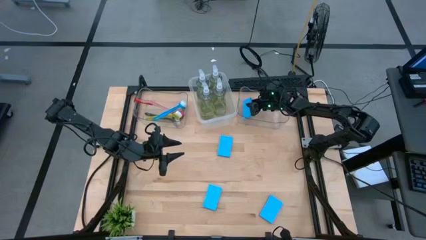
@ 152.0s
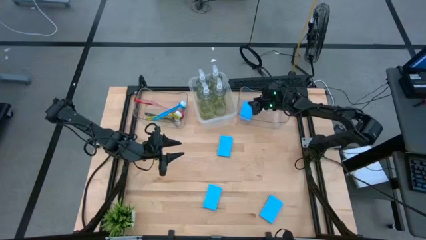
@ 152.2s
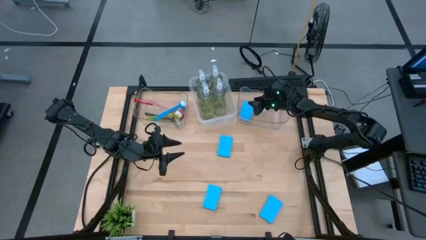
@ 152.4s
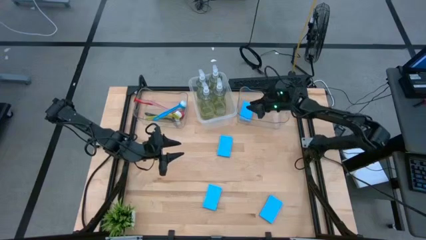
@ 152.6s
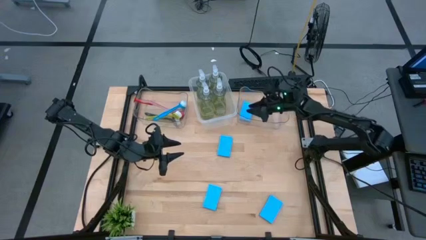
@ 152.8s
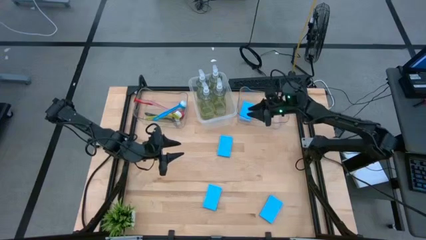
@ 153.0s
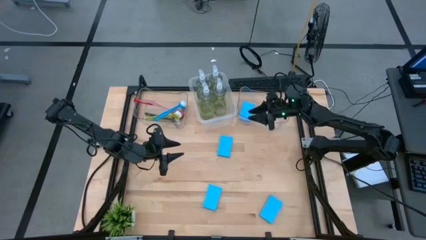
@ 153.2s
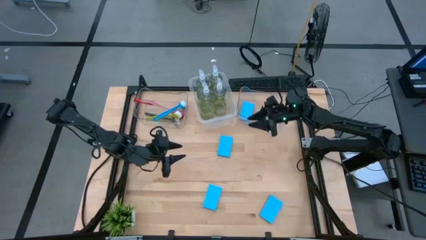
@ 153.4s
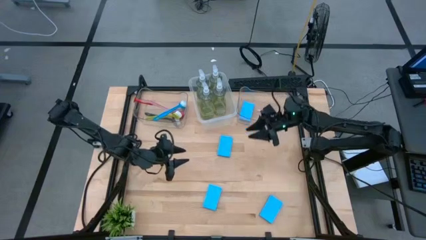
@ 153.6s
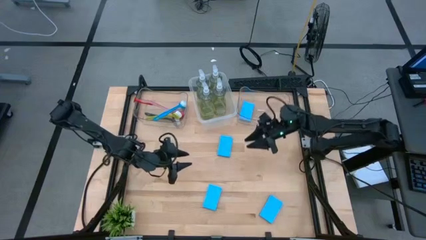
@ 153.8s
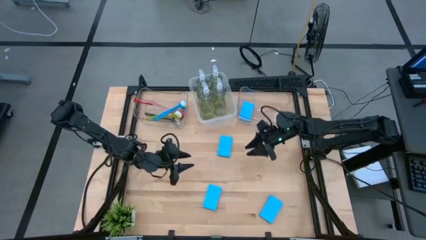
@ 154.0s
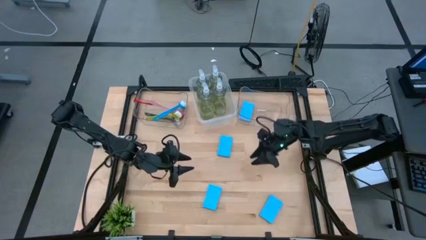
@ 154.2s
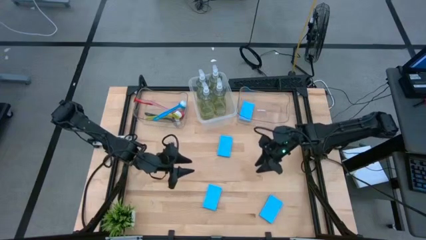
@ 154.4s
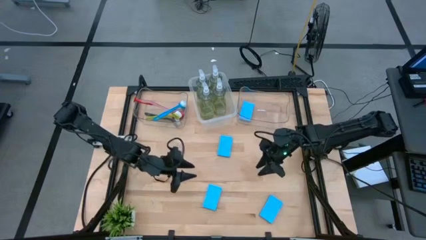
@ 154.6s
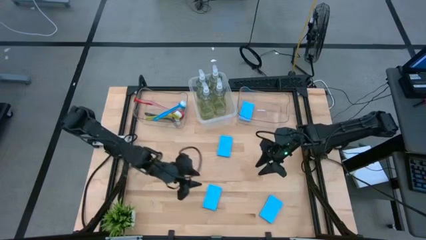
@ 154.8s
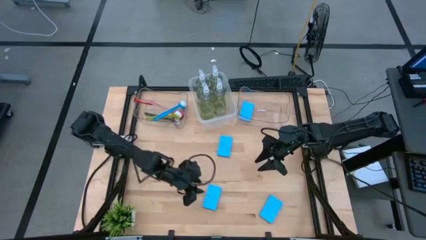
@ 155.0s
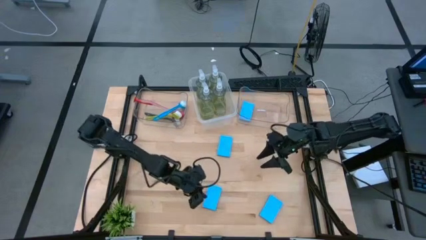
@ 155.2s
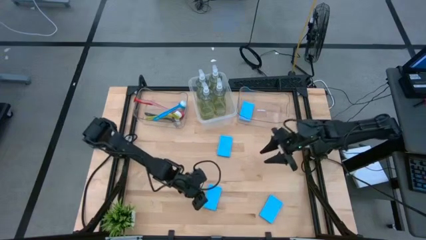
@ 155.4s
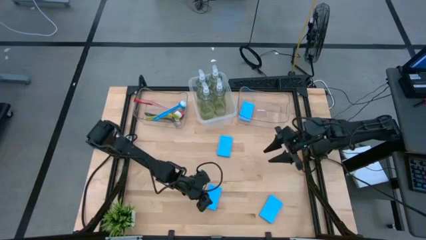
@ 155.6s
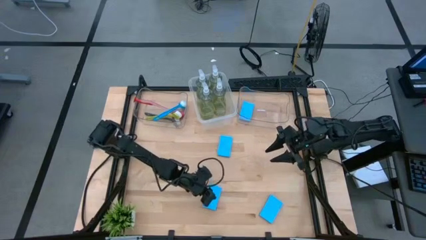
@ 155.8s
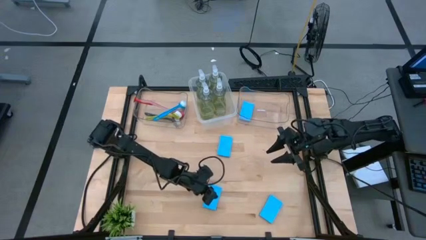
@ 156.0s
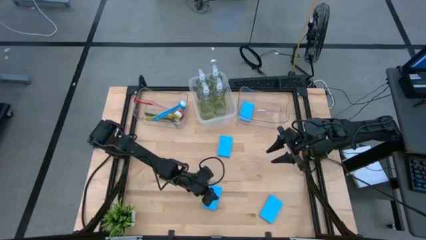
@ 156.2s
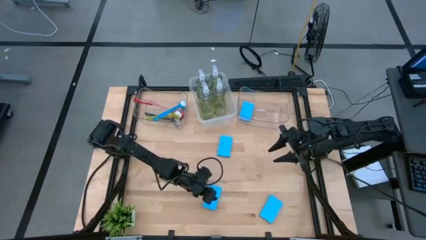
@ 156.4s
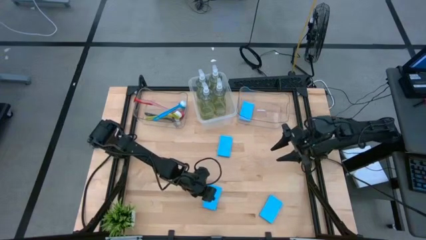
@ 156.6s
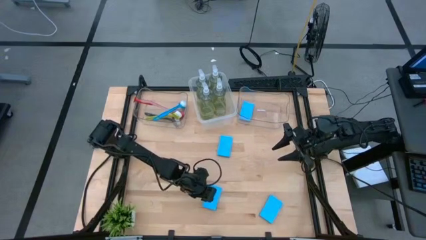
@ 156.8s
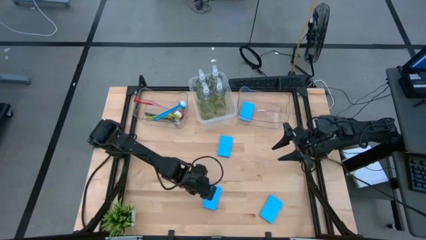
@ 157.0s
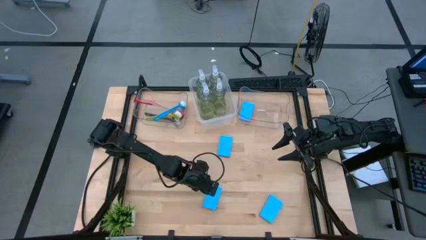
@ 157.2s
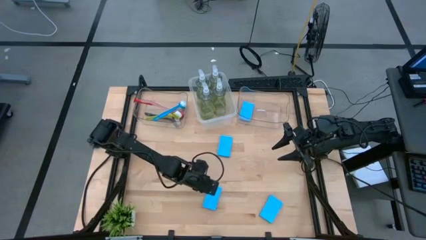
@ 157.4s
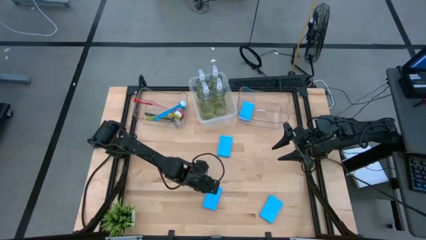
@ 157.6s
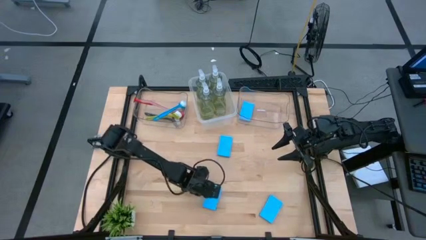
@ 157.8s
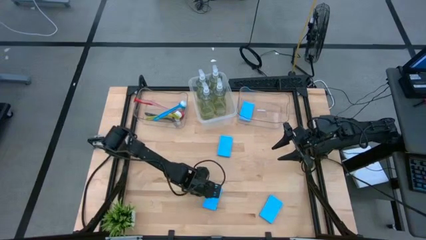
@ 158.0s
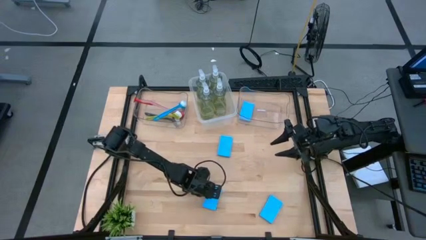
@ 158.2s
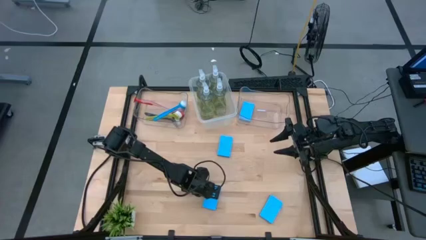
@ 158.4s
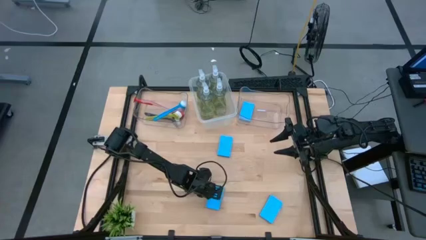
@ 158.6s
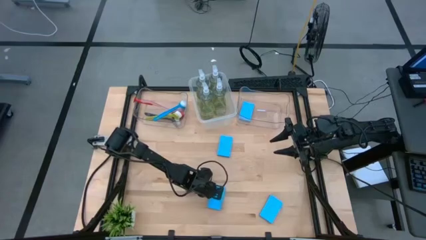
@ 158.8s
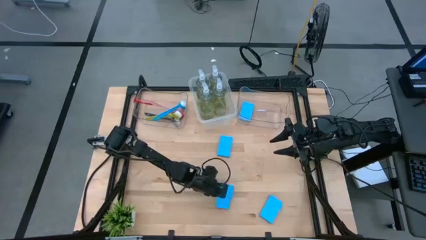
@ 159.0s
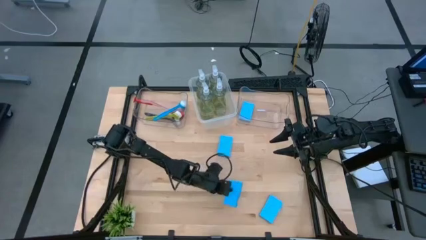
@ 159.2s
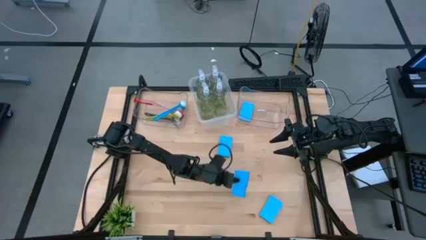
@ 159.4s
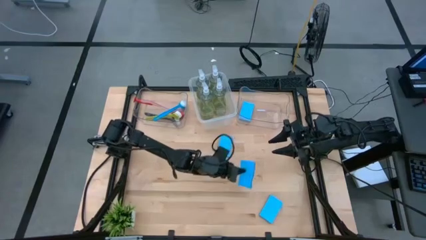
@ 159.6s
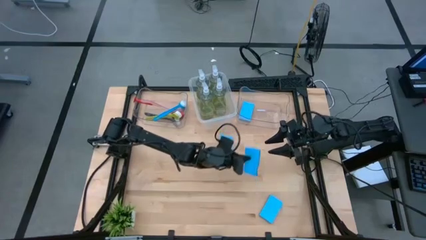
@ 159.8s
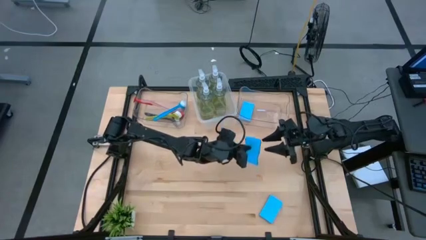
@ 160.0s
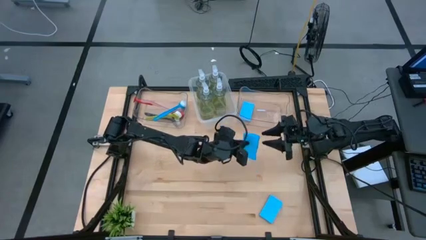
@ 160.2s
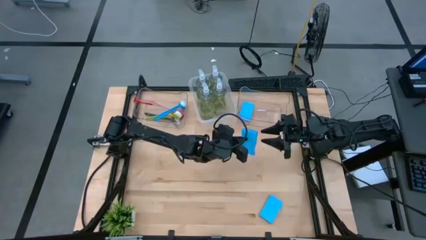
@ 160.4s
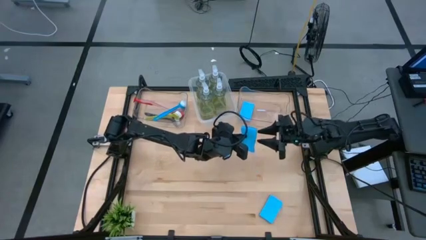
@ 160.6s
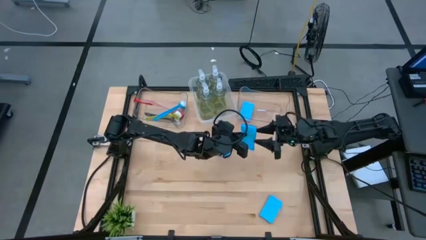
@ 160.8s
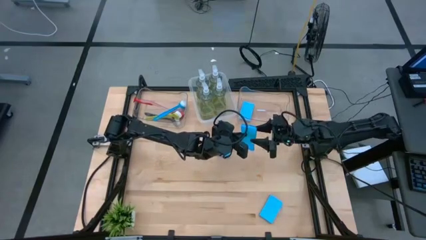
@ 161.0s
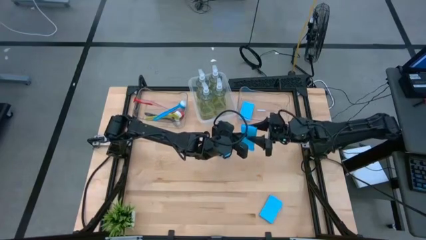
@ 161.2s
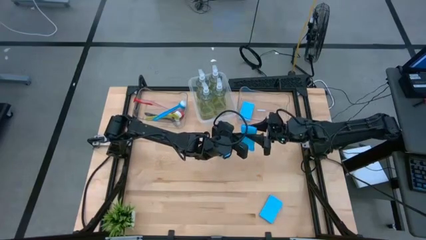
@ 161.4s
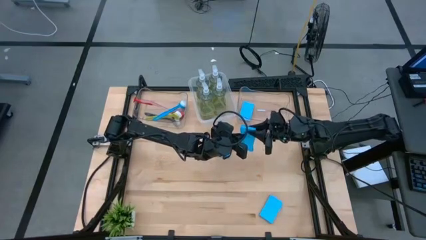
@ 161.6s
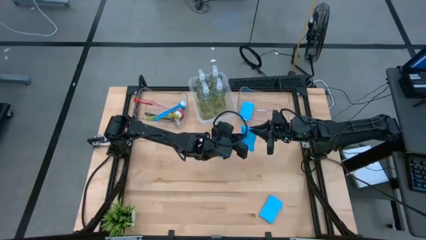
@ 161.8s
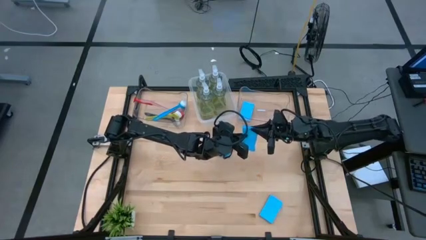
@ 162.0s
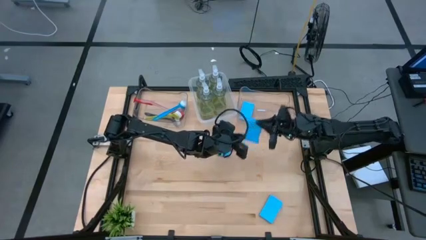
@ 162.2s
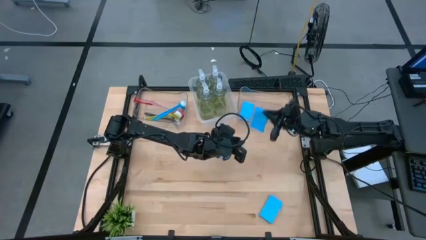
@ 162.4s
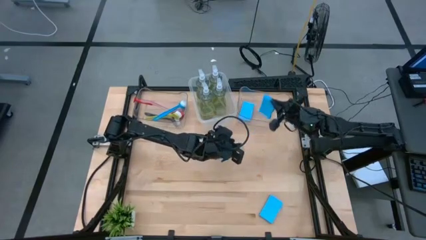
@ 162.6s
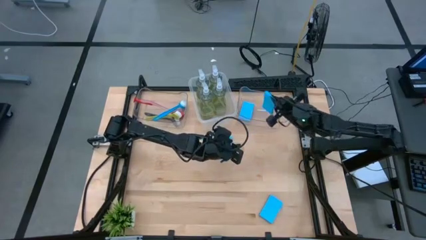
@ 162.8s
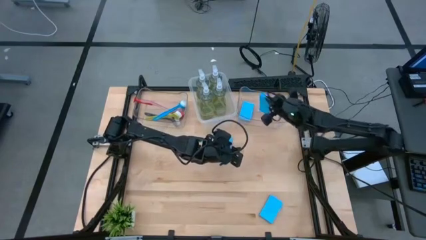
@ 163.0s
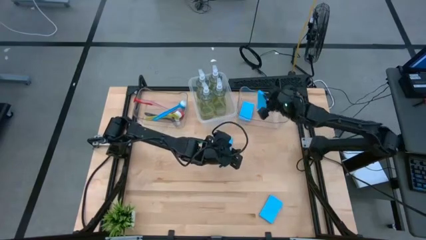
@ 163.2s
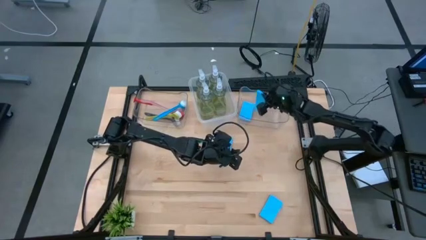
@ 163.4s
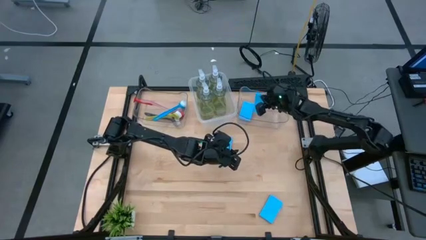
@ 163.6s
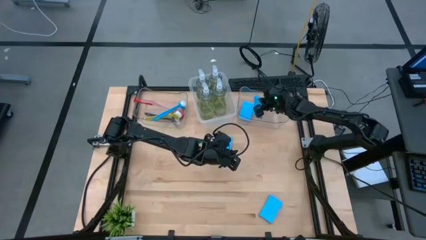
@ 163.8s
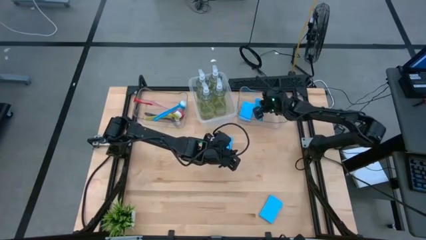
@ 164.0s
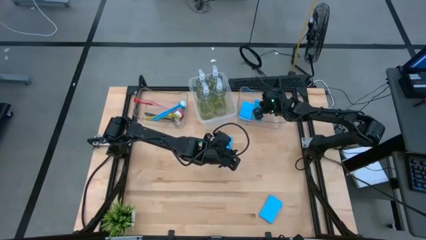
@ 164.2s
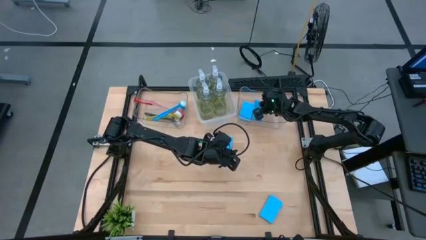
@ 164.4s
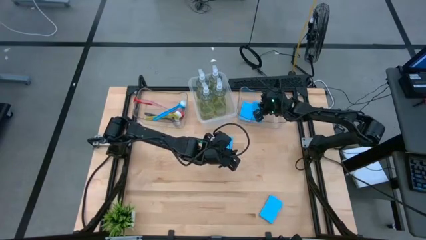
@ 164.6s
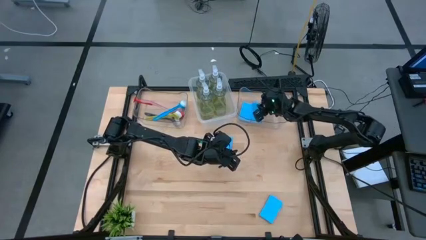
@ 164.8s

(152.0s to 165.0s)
Task: Pick & Place Kitchen Sink Supplies
Put the blue sponge into the right transparent bin
